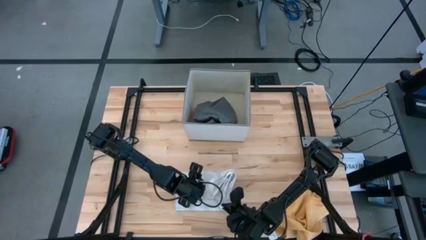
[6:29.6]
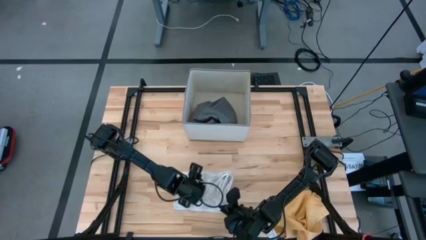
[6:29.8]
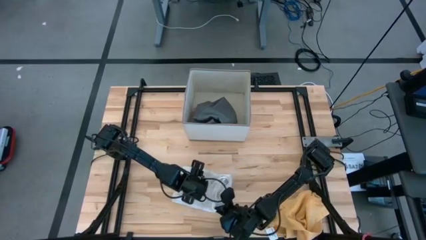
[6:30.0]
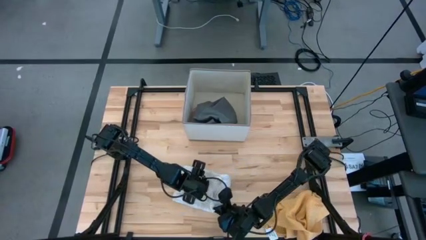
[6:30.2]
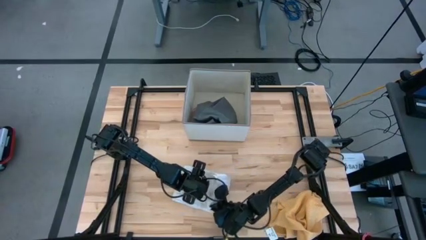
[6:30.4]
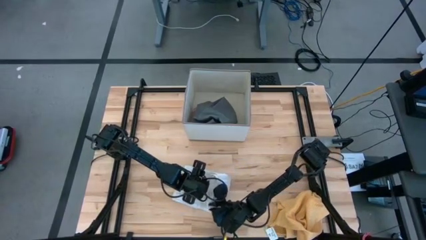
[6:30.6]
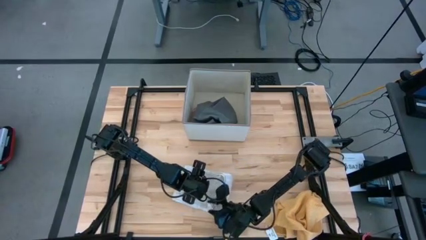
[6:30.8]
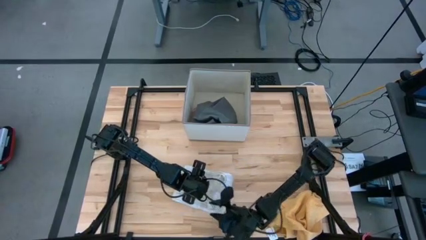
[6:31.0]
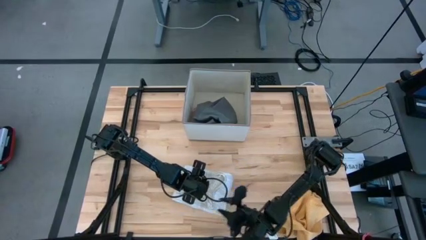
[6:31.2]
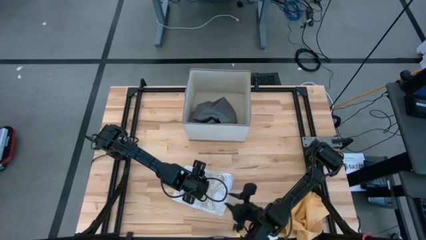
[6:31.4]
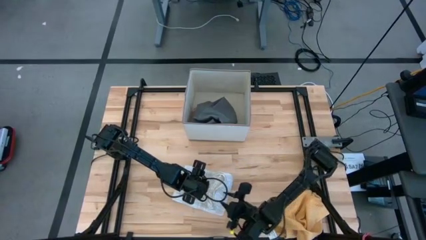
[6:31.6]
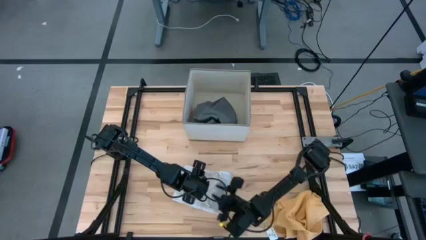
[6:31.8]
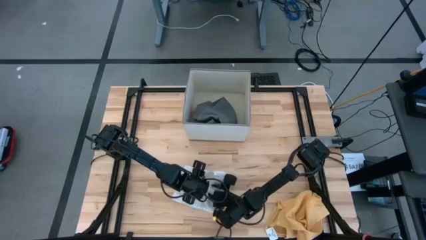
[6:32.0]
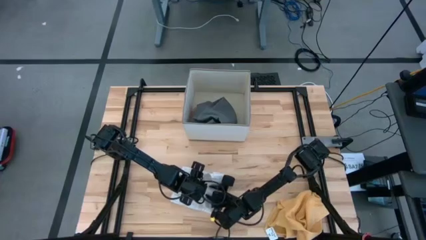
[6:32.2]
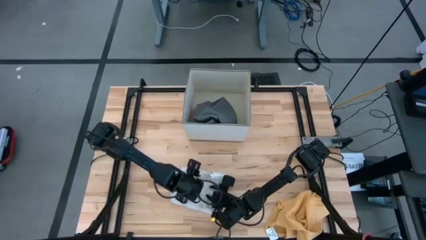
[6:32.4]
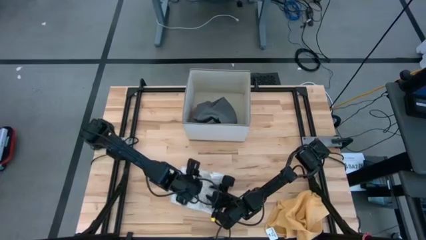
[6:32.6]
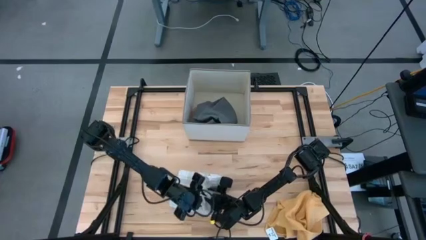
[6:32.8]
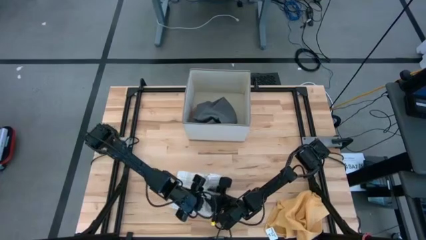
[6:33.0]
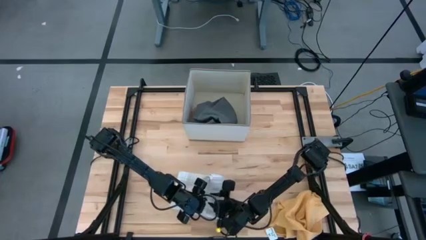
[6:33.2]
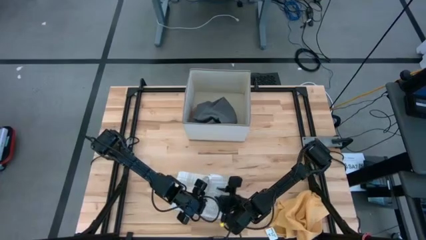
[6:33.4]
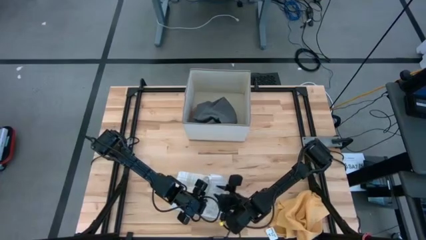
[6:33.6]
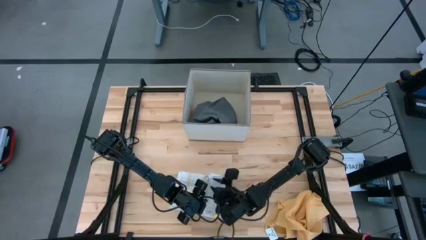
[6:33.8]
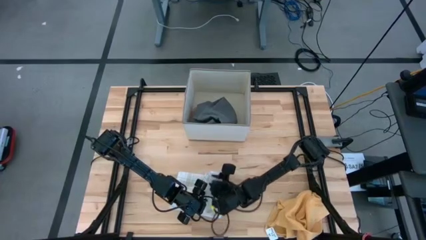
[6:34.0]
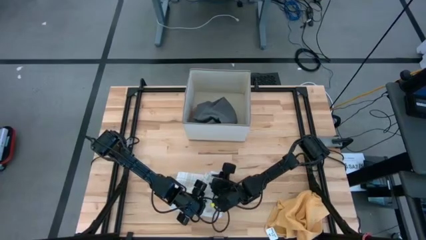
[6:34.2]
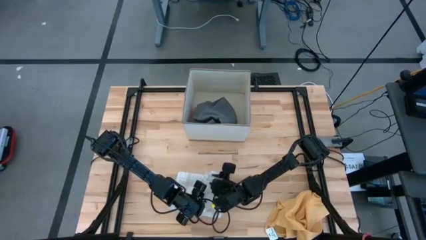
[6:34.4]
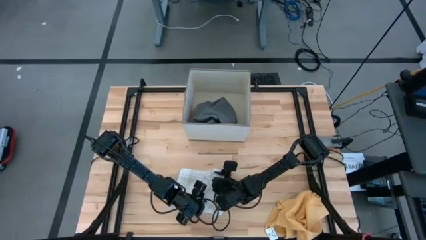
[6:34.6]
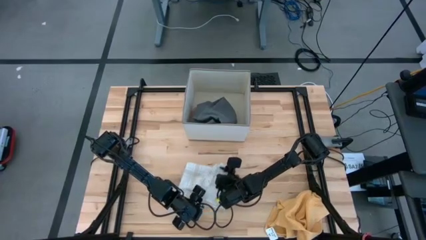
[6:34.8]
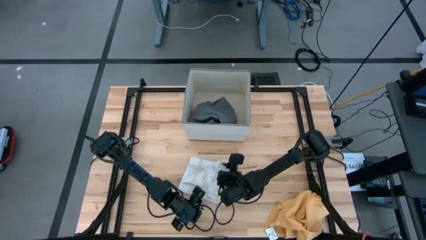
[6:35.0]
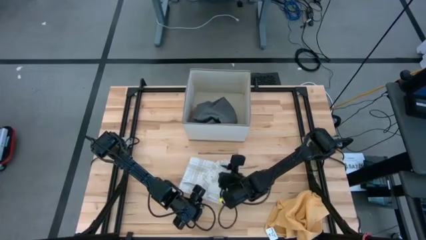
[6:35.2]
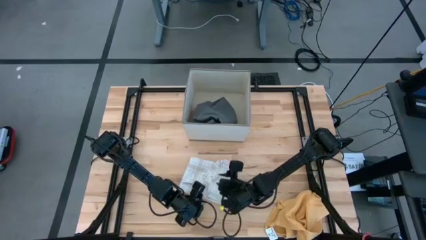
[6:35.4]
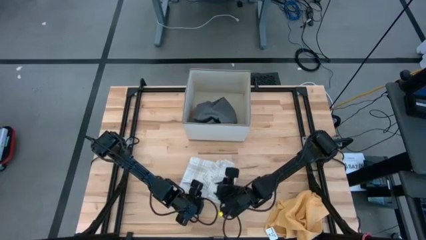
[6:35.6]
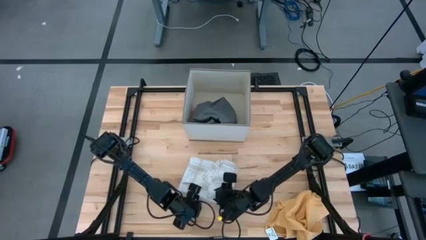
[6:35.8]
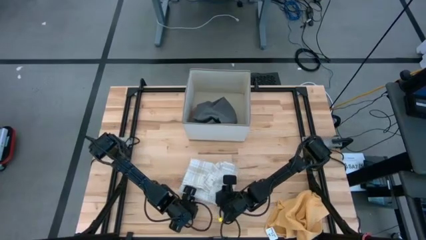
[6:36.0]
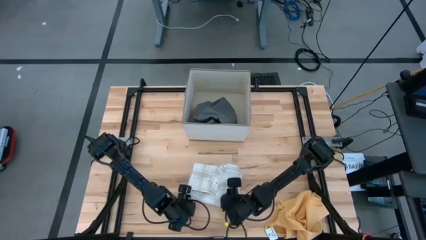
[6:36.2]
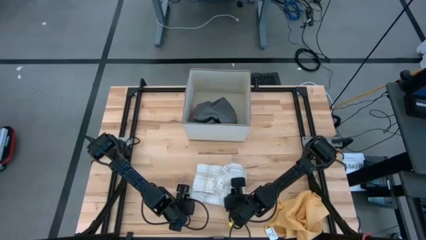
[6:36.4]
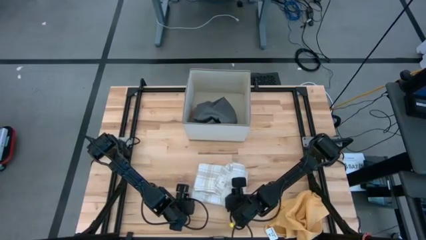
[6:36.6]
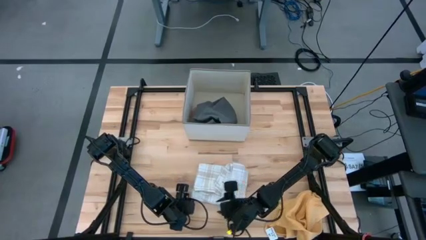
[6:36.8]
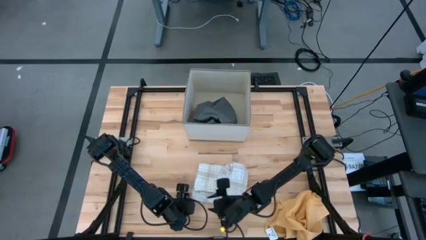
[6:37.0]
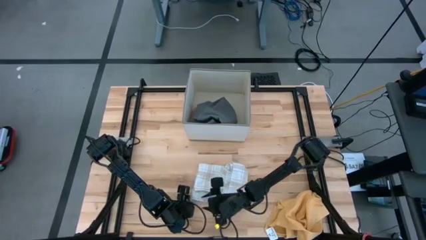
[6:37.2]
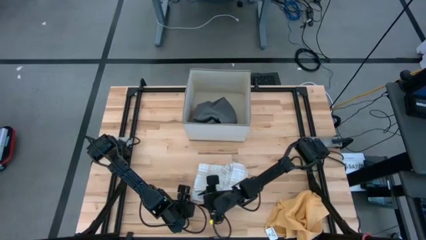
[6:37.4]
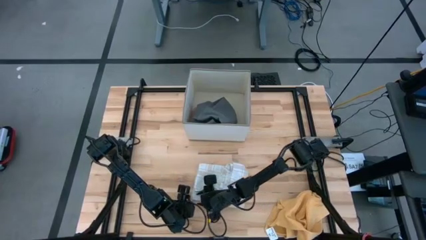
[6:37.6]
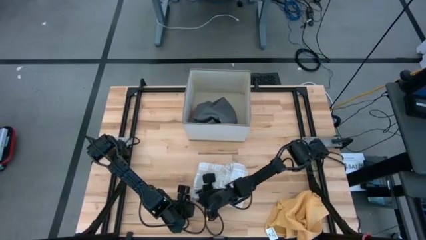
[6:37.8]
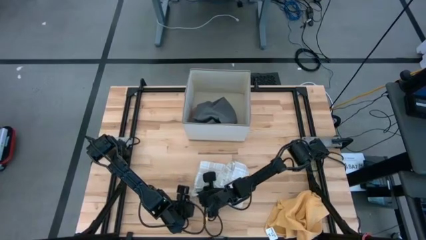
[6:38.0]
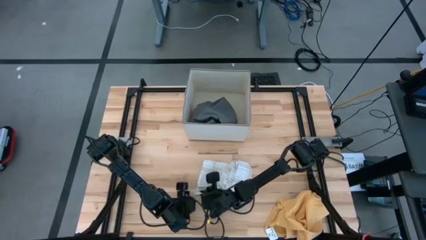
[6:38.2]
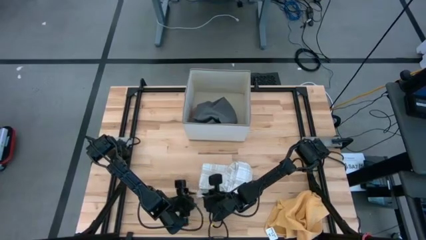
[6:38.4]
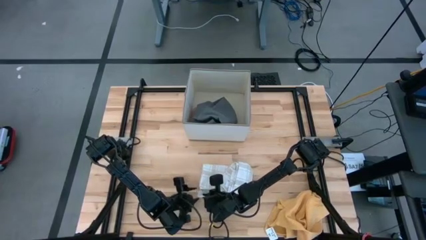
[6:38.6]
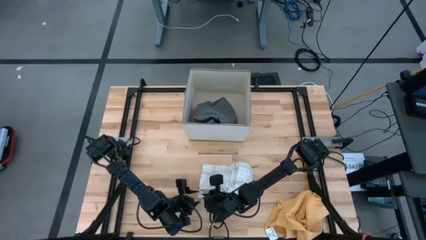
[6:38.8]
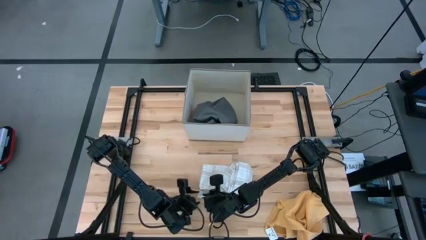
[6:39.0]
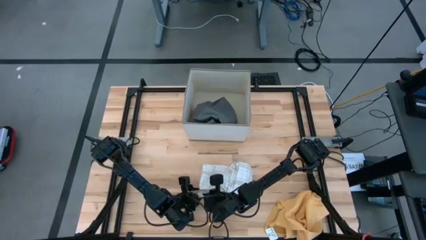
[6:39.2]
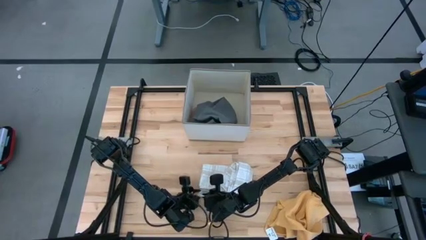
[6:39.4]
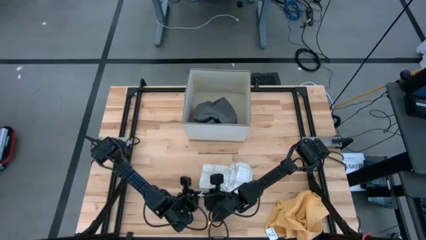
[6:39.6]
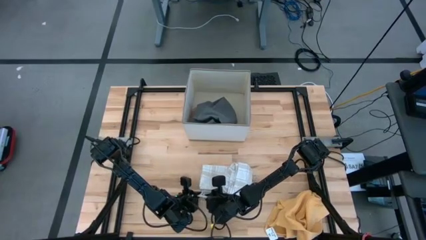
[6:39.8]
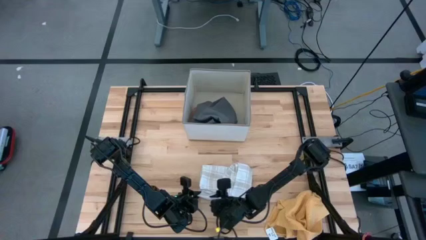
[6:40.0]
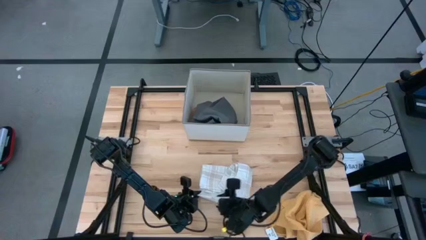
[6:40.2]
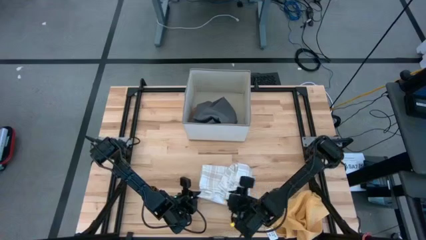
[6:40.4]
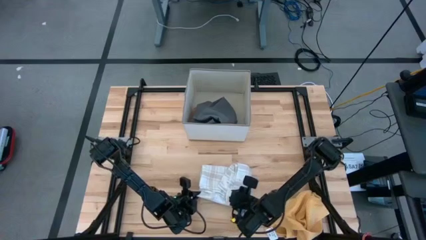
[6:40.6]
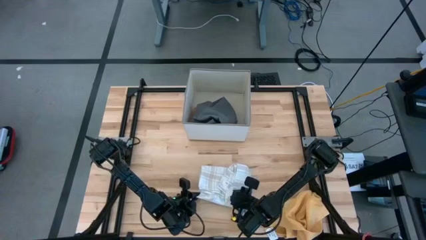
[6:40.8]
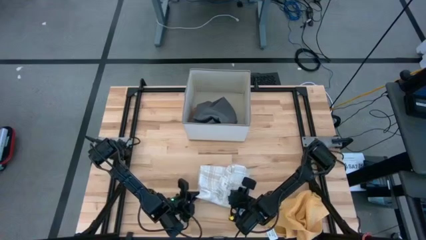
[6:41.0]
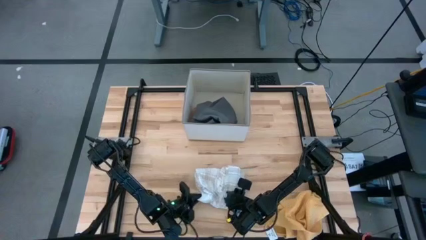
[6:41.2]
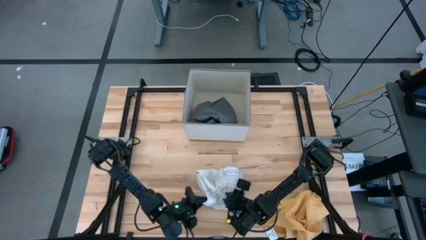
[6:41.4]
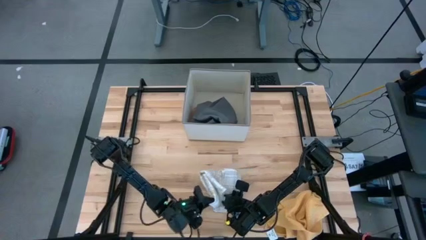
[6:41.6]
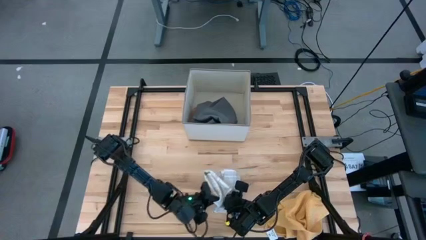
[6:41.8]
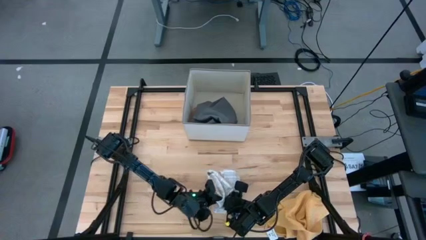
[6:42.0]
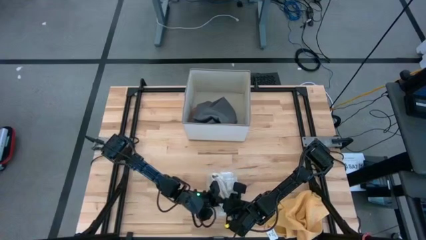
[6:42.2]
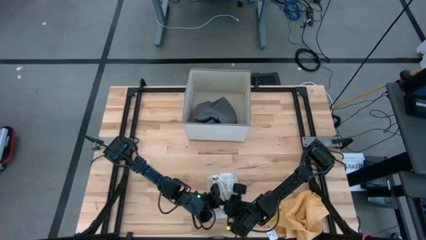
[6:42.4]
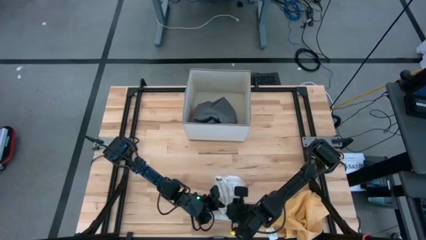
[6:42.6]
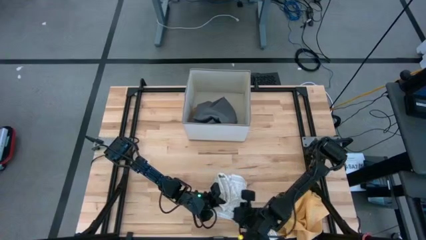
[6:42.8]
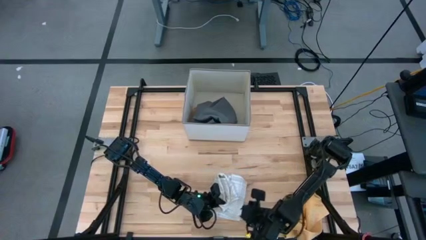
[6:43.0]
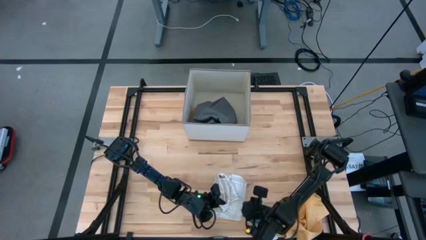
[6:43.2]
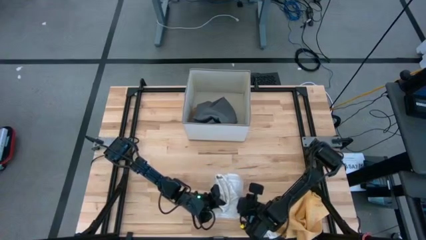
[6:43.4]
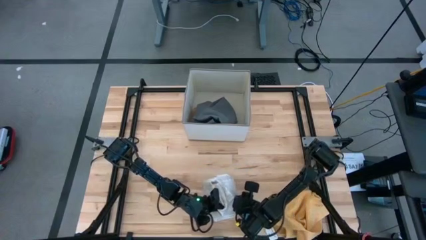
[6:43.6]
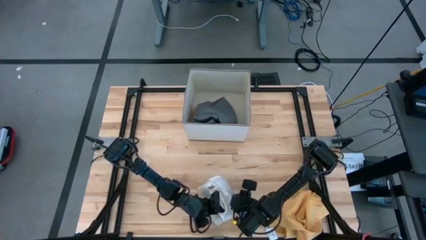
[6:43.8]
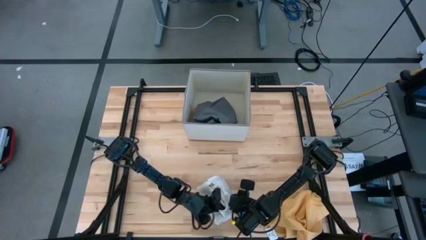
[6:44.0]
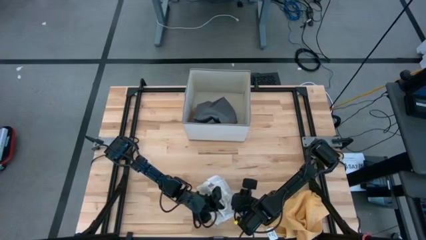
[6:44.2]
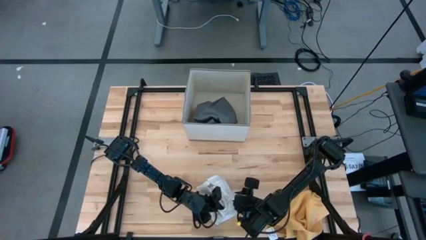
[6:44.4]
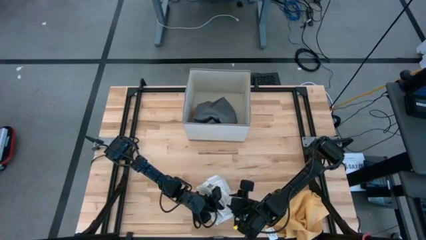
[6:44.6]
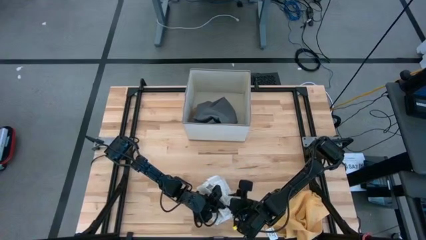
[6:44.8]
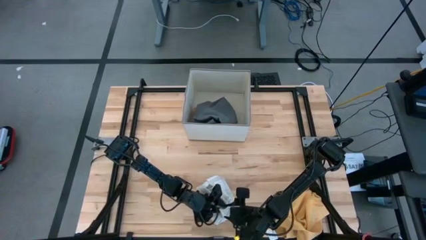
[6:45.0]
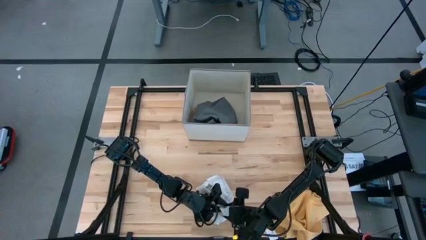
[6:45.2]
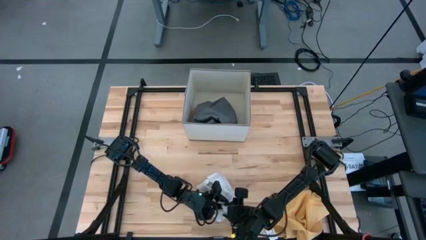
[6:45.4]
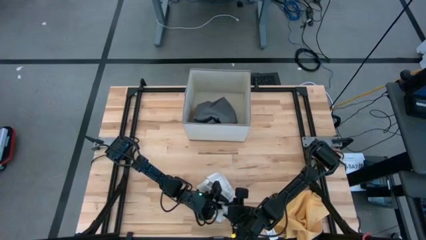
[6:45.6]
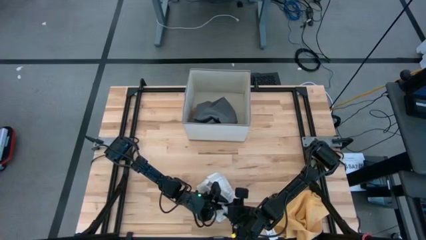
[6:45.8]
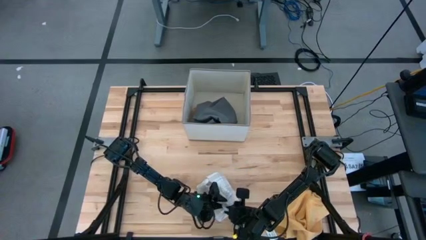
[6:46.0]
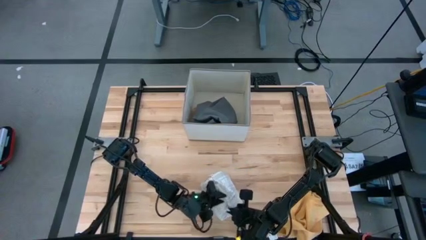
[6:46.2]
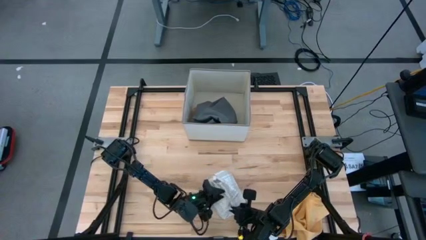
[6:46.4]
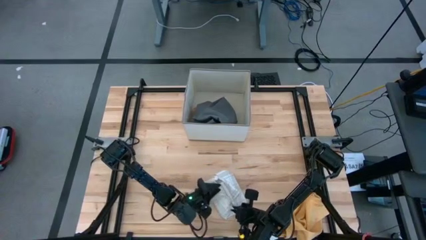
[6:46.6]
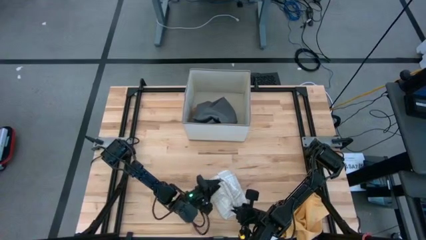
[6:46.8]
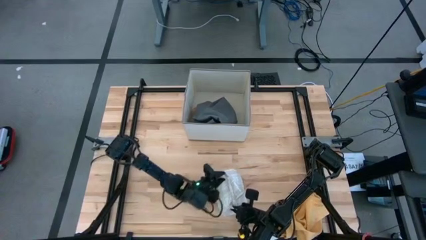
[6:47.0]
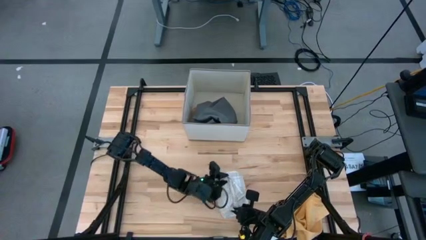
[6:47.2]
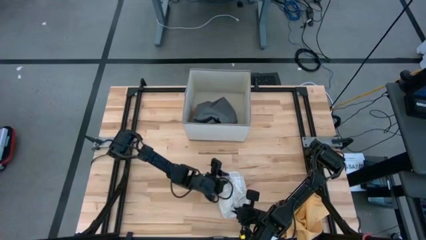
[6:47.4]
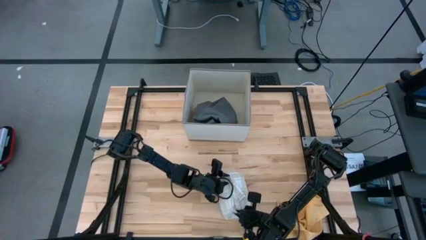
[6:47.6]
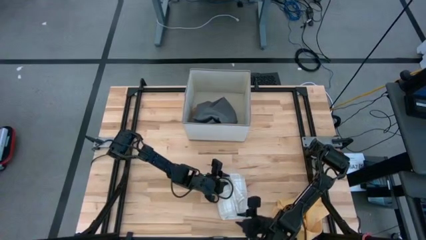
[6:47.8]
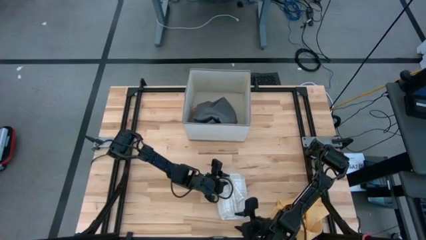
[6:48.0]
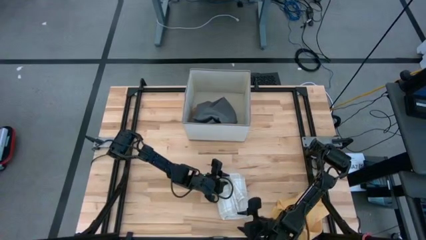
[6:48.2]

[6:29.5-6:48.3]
Task: Fold towel
Fold the white patterned towel
